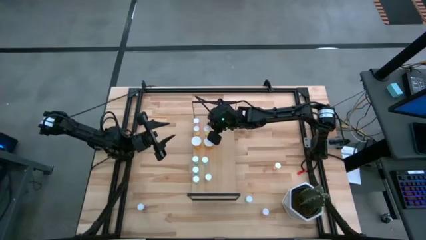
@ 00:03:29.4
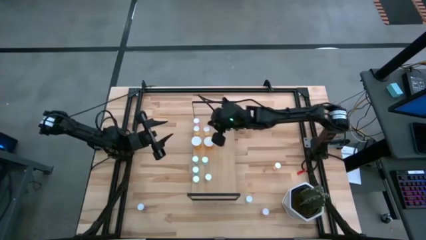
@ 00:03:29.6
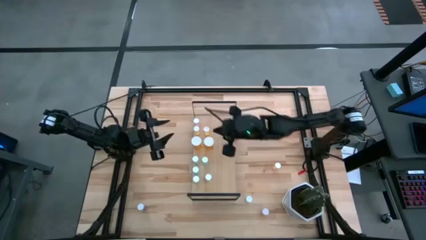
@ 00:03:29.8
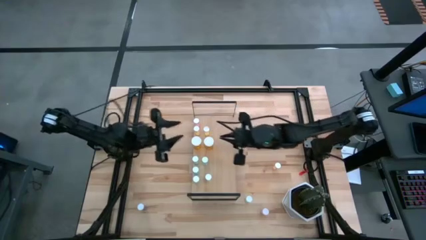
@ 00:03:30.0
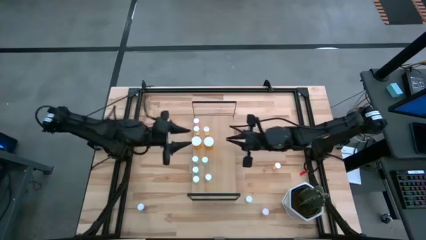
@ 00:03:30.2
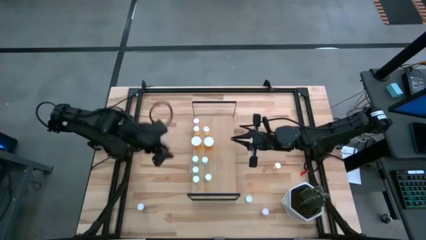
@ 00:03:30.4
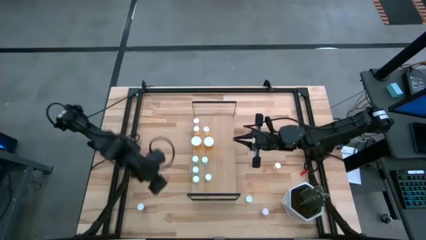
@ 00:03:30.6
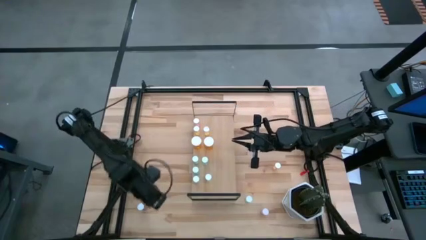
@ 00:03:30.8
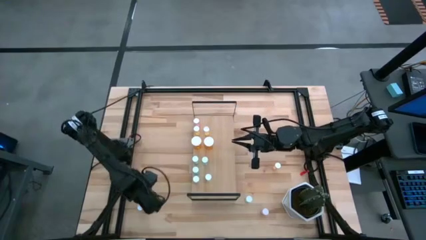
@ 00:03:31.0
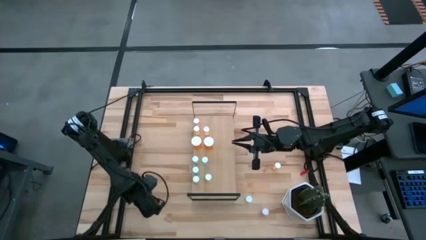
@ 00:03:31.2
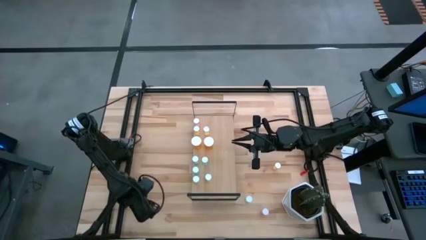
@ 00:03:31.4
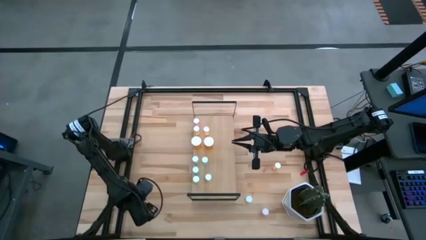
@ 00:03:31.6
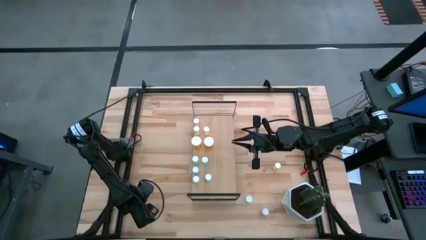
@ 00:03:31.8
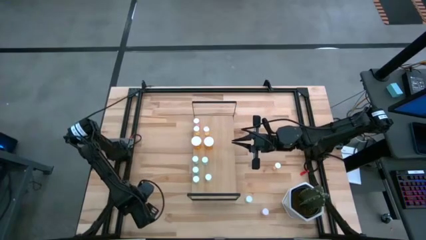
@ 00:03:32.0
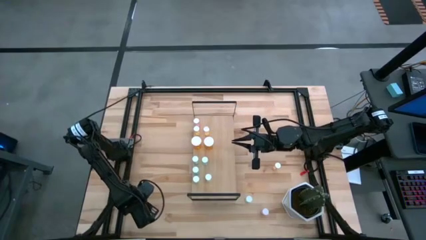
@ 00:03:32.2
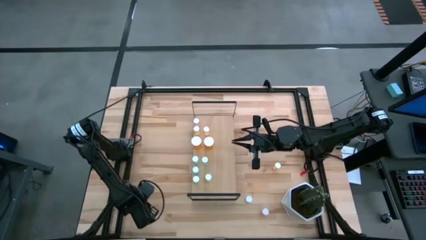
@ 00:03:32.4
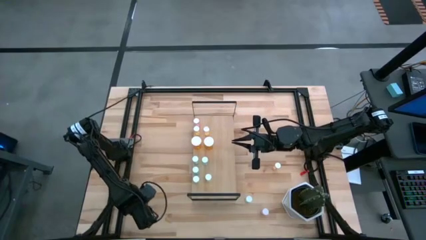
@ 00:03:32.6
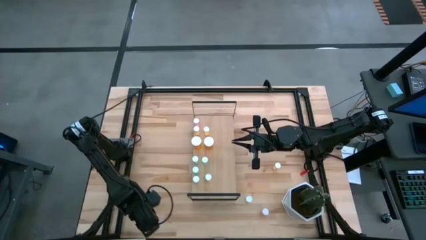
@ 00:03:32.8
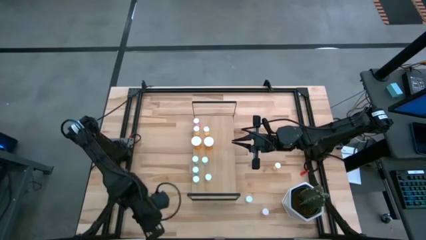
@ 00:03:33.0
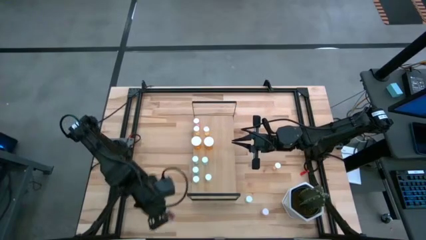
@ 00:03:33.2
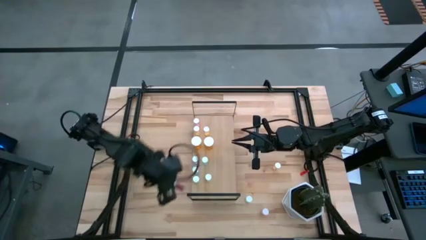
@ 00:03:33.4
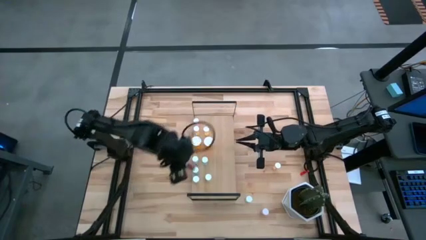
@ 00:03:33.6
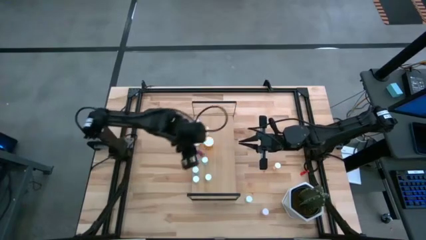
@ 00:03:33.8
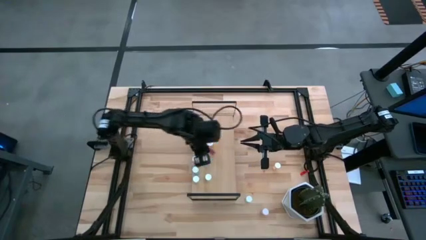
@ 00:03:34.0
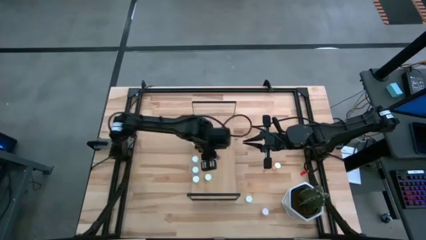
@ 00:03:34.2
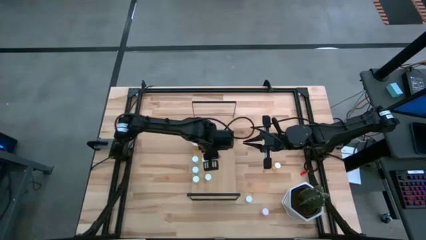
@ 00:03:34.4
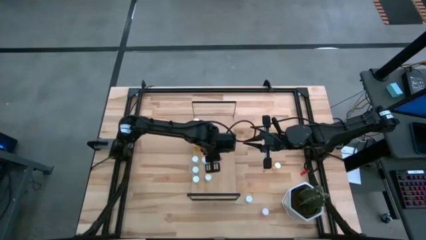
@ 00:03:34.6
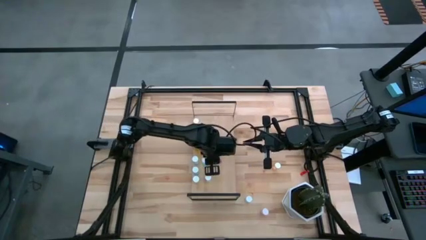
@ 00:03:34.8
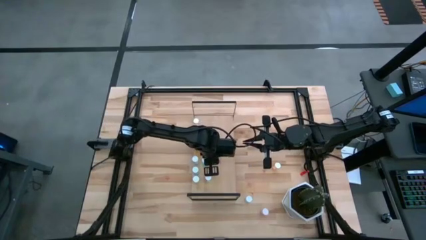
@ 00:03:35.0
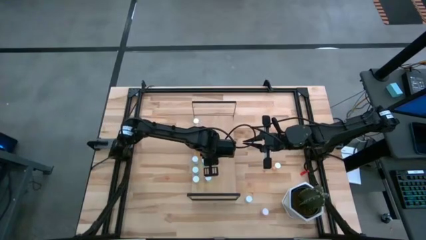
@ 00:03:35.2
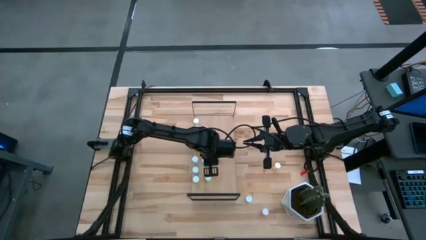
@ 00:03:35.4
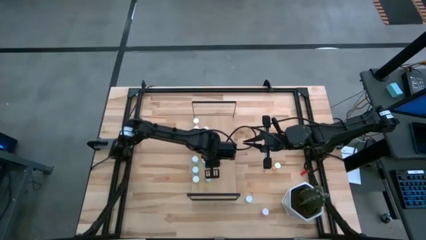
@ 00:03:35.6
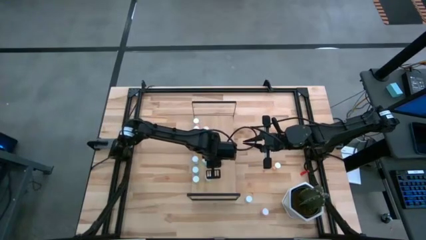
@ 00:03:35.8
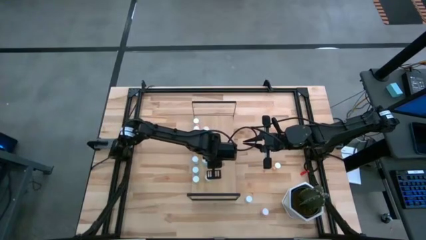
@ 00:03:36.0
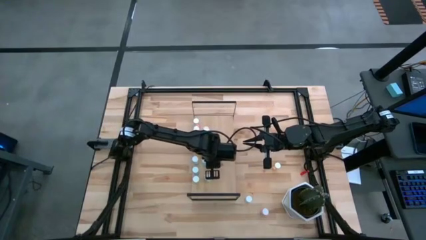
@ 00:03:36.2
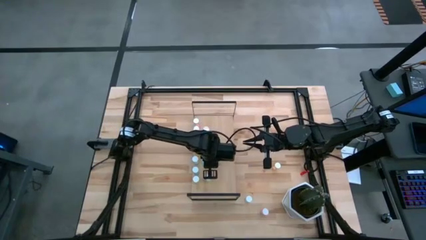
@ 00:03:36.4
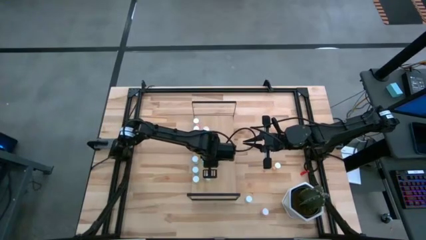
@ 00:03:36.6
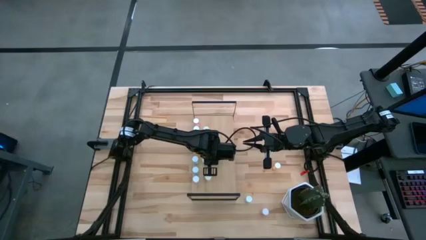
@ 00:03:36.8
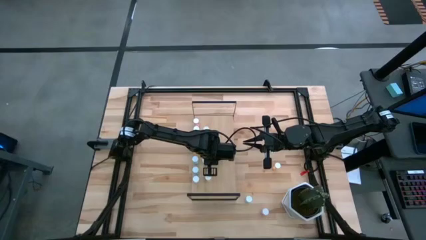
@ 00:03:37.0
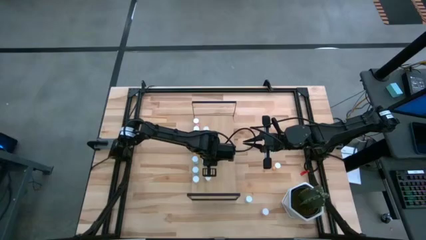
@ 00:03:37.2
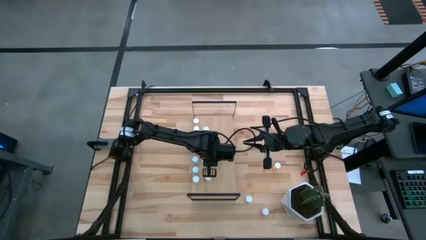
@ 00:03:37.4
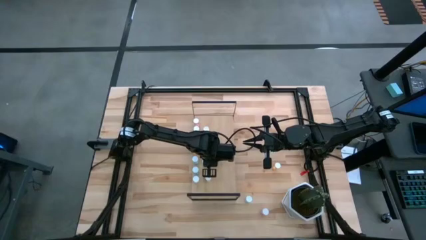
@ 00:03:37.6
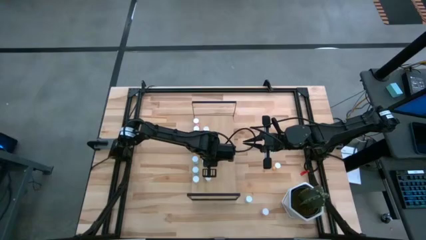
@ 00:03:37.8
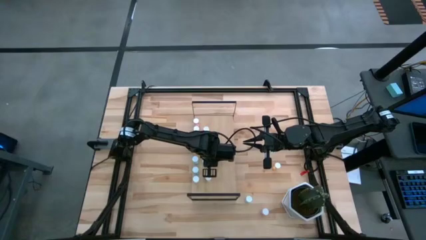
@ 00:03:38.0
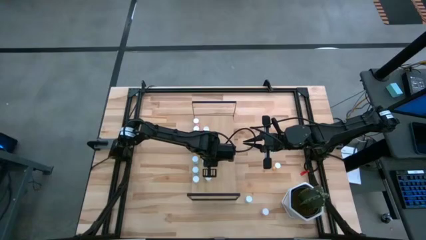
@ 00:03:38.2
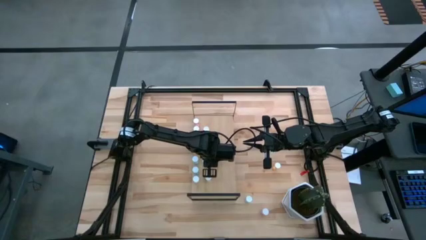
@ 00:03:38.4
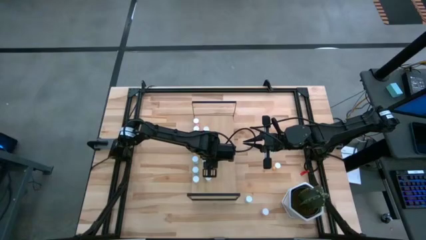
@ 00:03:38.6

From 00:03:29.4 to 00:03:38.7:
Task: Pick and place medicine bottles onto shelf by color
Put the blue pill bottle aligned with the other blue pill bottle on the shelf

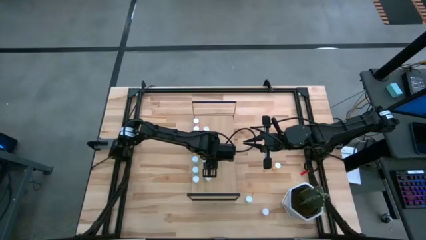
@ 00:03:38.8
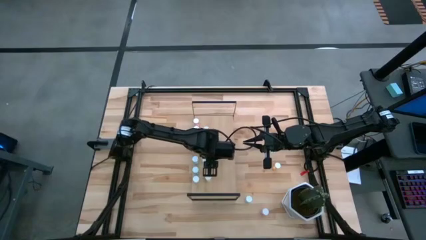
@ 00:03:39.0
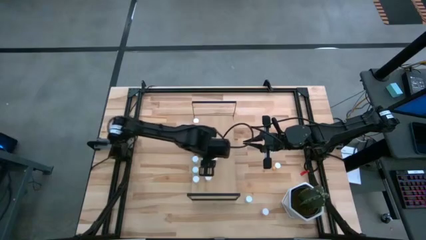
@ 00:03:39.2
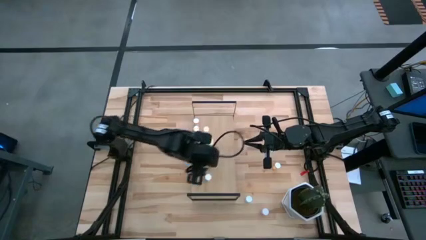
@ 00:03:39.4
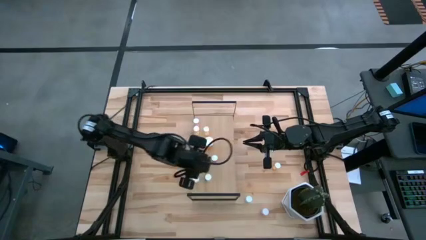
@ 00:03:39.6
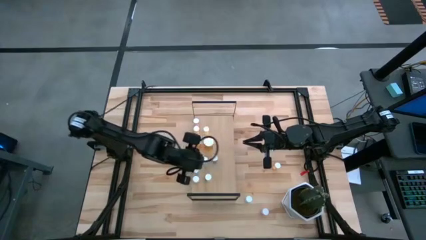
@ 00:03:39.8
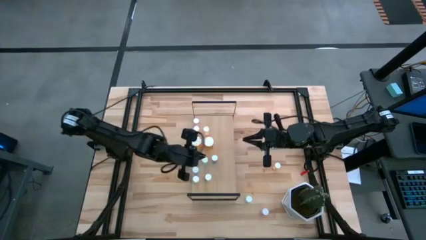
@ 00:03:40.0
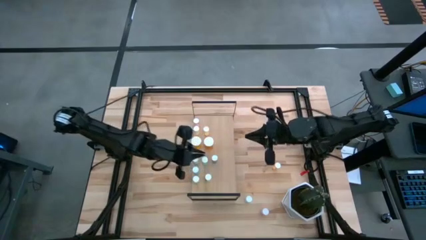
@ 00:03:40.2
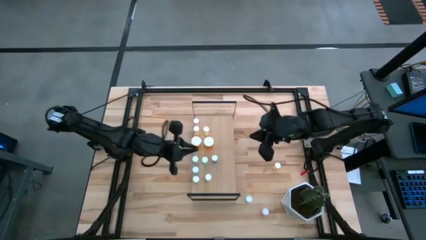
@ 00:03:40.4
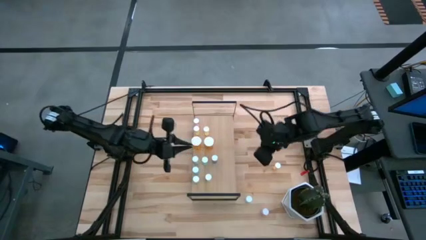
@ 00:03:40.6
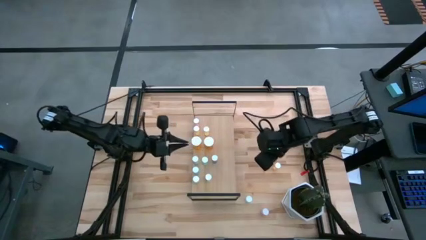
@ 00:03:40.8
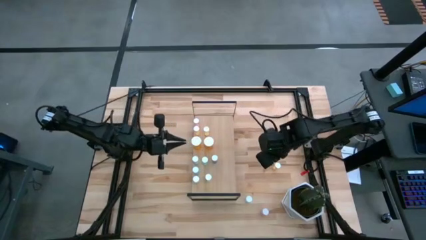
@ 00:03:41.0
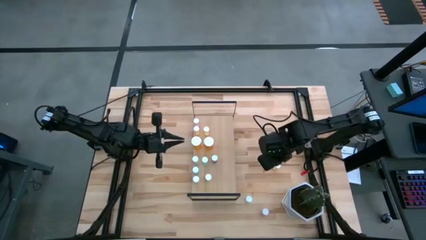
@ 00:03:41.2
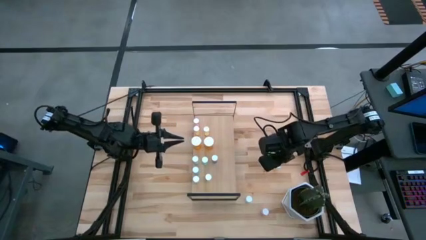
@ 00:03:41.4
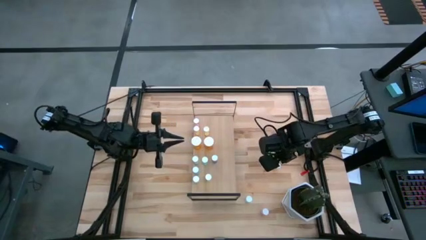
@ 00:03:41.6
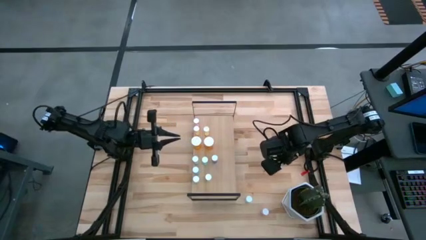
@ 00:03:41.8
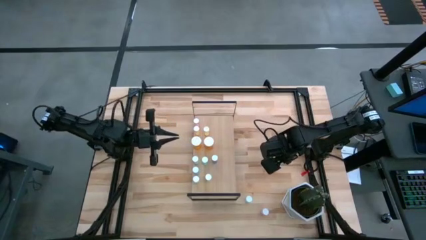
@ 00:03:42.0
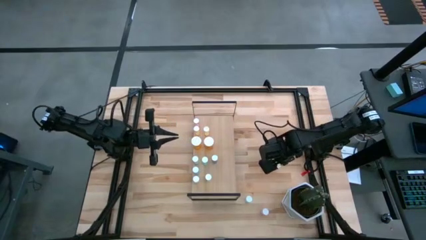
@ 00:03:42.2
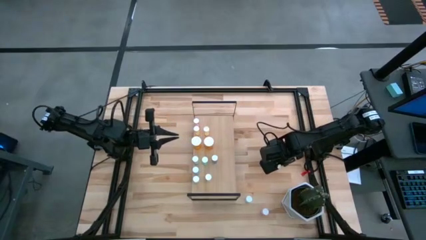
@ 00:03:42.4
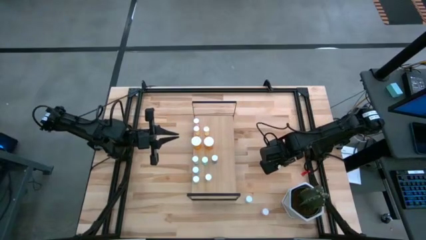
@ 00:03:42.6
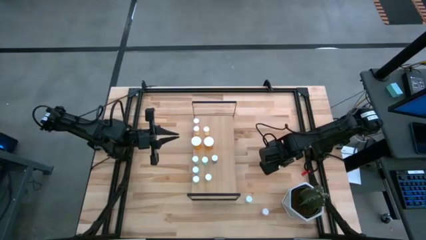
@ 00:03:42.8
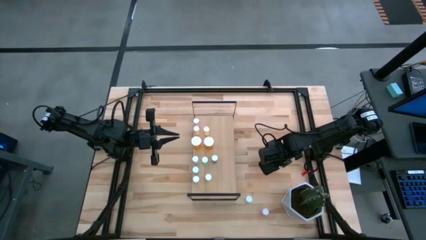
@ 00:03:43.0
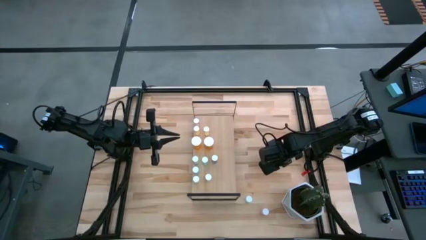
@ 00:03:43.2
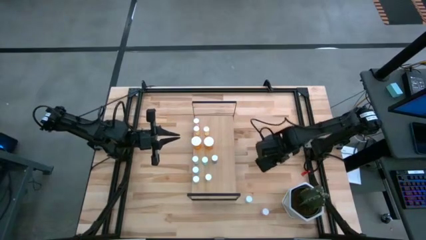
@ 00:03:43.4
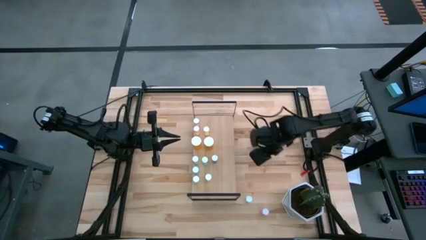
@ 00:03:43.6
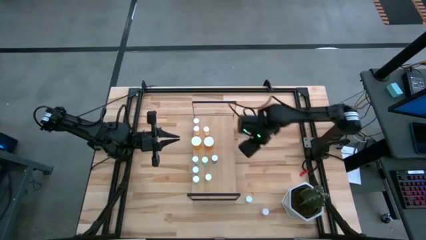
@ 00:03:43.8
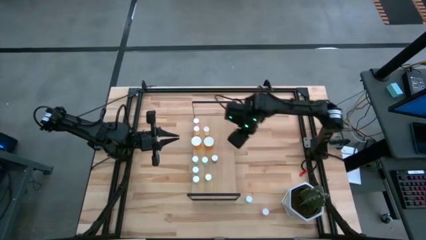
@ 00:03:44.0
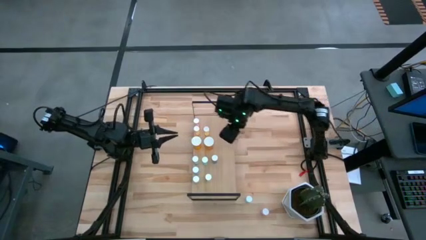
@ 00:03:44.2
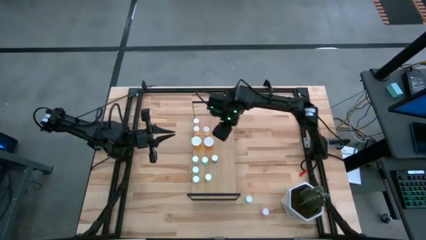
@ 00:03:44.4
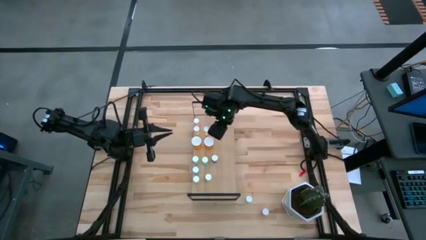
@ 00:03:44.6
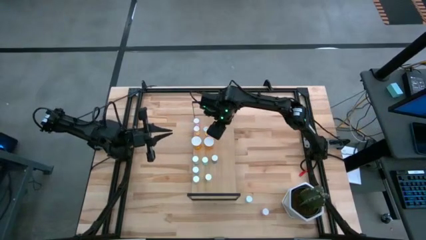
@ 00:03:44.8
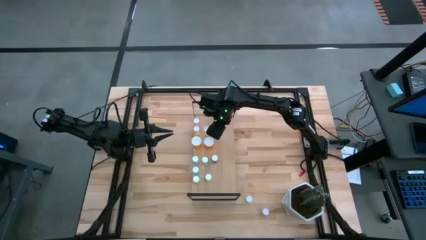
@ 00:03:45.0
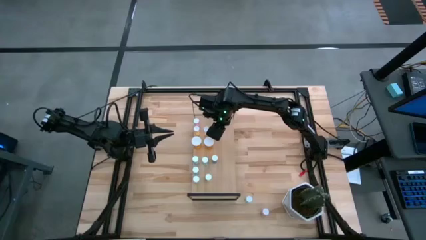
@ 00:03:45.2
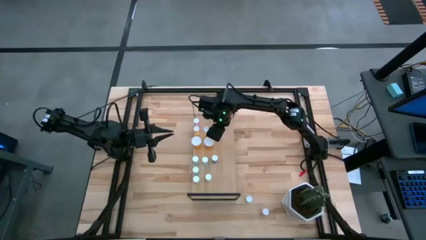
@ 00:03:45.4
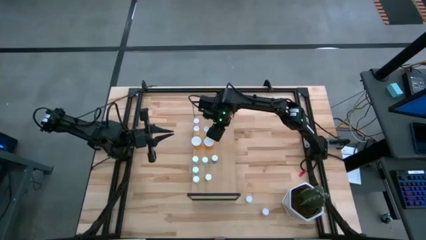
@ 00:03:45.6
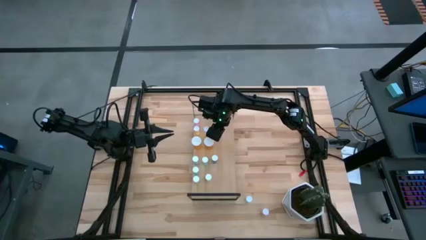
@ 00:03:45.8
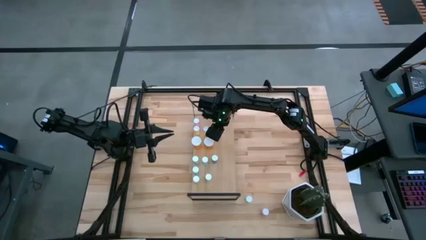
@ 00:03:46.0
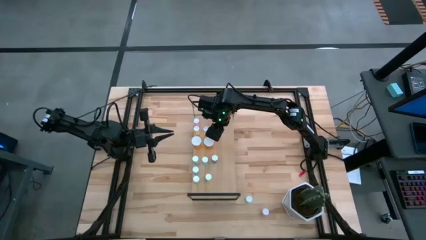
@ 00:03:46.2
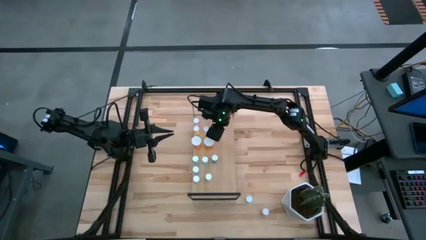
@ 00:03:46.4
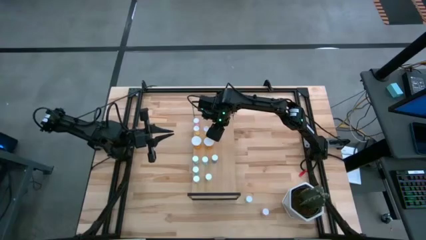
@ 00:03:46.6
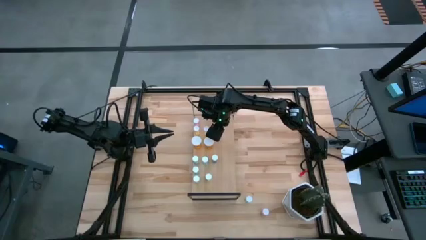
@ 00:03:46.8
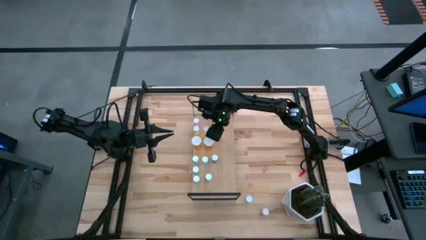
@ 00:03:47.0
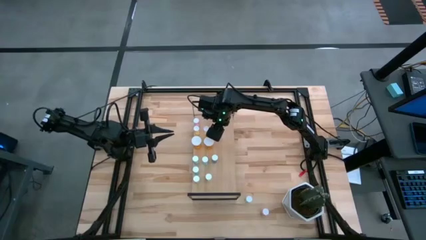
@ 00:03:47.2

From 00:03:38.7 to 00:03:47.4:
Put the yellow pill bottle aligned with the other yellow pill bottle on the shelf
